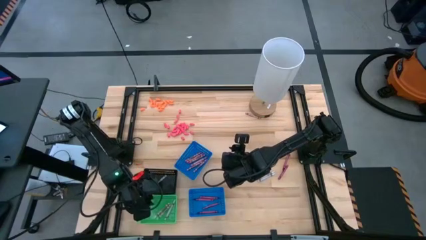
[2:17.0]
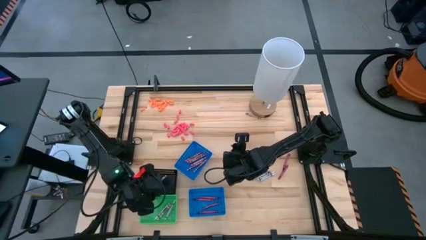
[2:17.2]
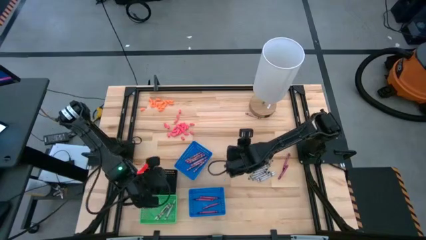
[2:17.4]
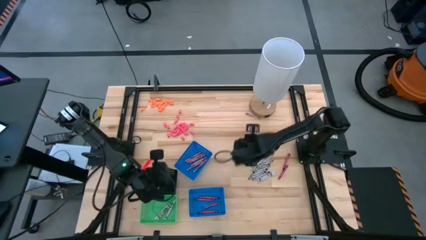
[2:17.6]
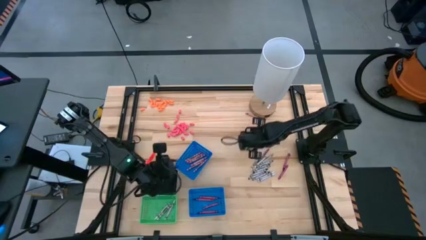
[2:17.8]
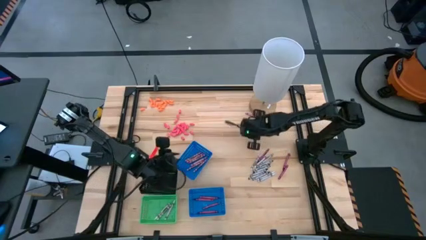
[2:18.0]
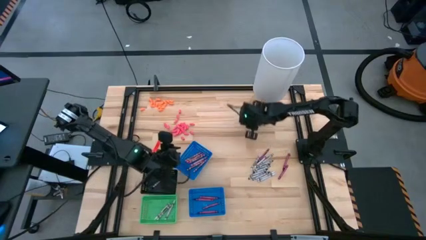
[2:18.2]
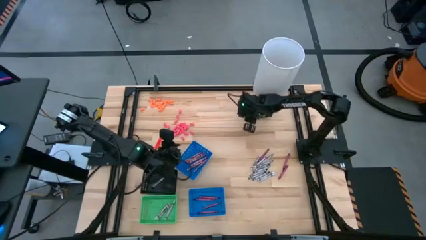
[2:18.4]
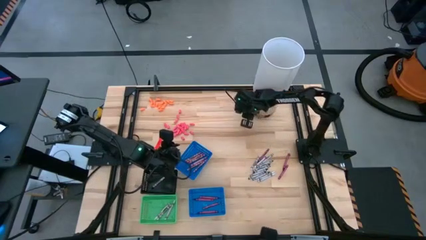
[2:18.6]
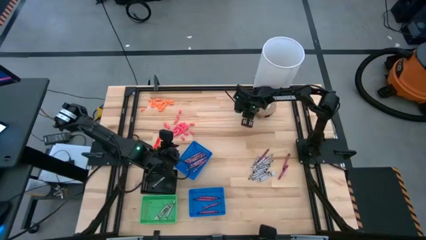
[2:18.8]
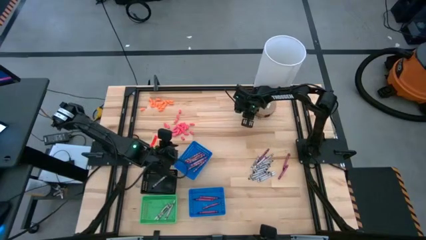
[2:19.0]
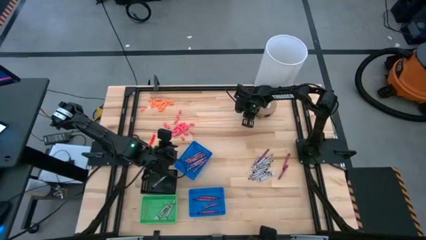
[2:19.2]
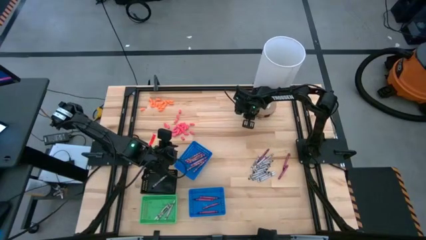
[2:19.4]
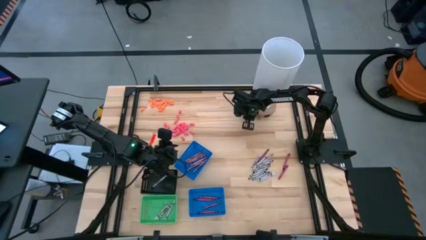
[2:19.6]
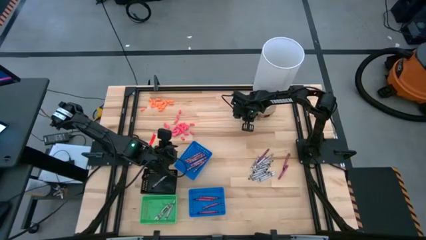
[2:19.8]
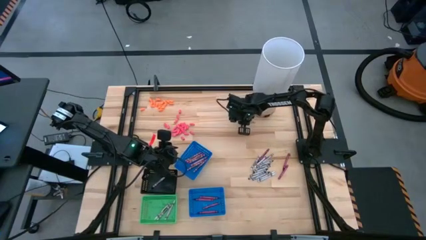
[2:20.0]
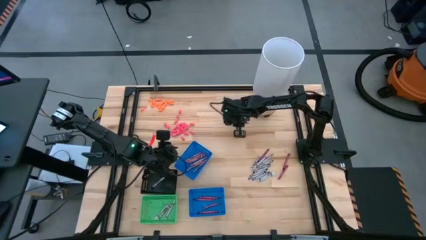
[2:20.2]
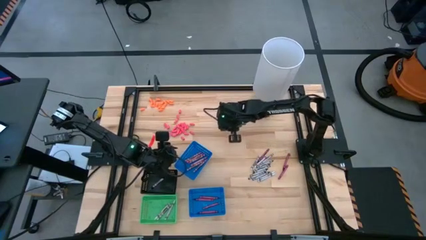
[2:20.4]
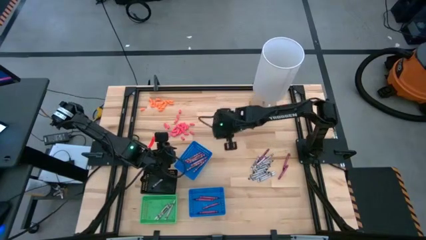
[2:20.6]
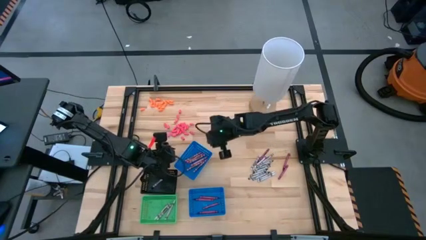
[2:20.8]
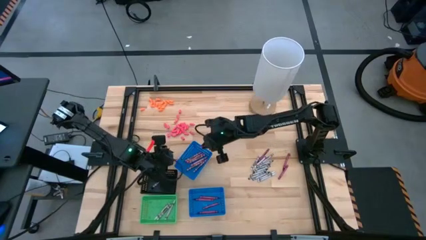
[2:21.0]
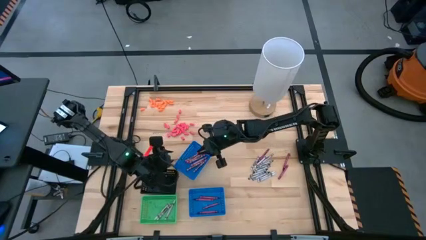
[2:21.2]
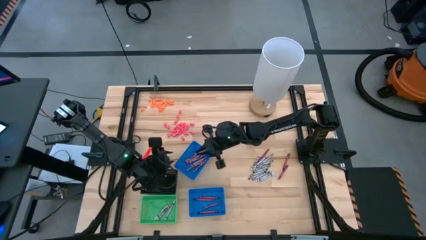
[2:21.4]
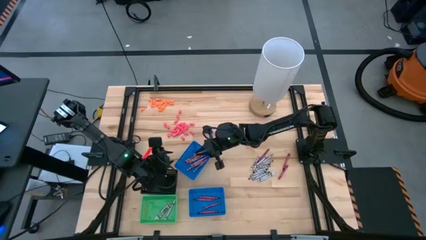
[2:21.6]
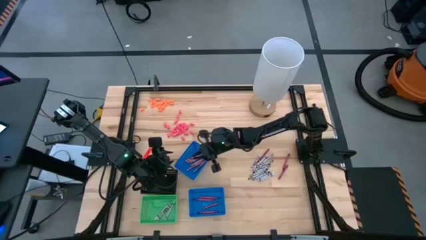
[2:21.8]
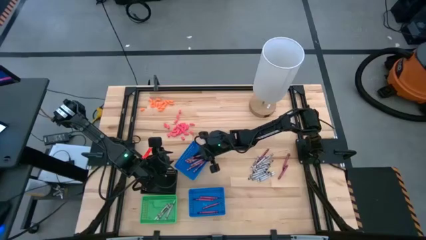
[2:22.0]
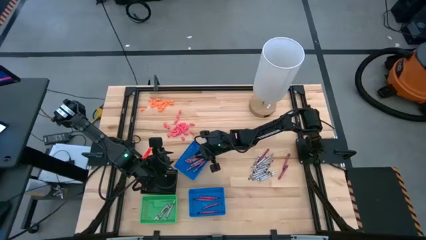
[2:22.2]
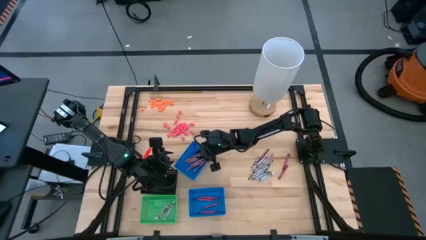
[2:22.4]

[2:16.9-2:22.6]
Task: Sort crayons
Put the pink crayon into the top blue bin

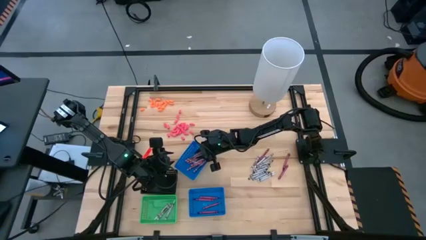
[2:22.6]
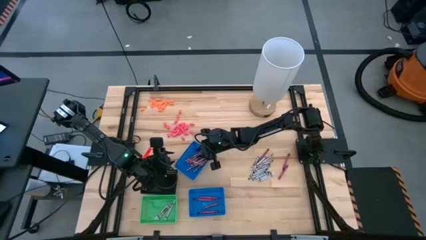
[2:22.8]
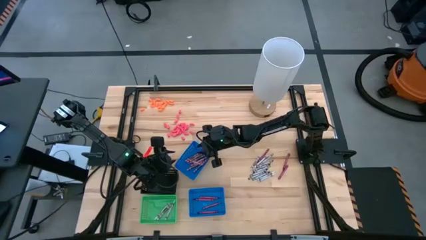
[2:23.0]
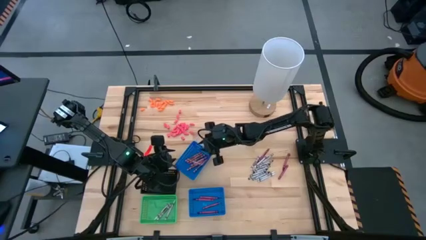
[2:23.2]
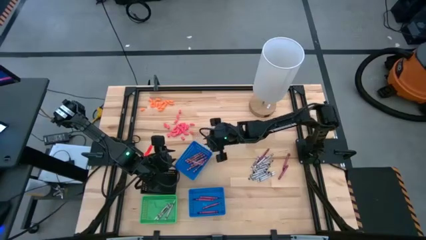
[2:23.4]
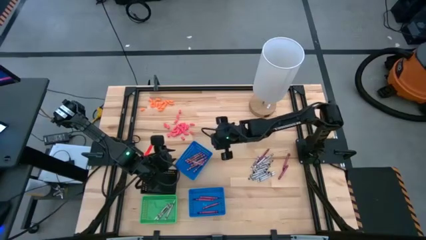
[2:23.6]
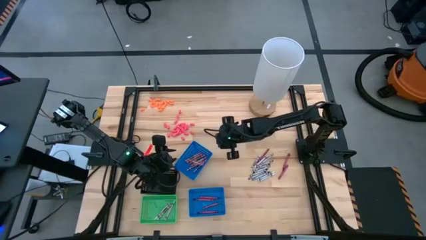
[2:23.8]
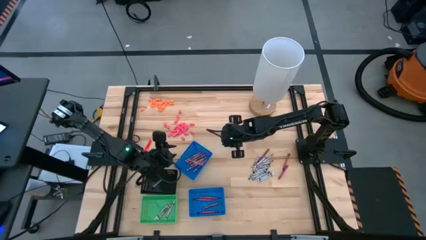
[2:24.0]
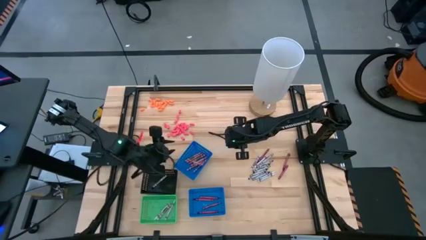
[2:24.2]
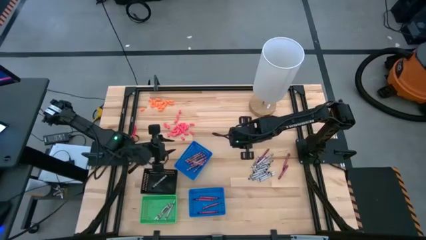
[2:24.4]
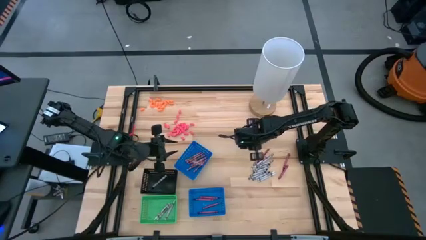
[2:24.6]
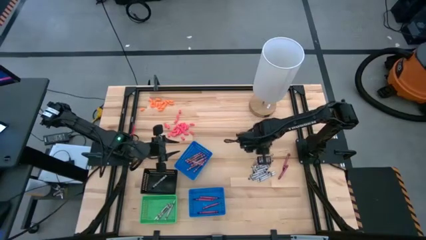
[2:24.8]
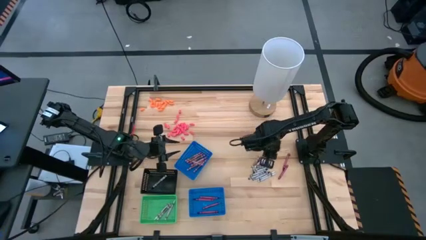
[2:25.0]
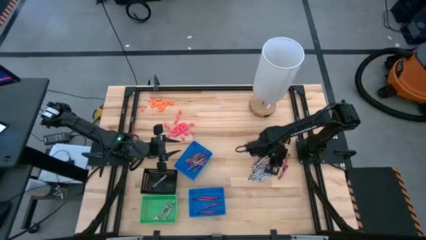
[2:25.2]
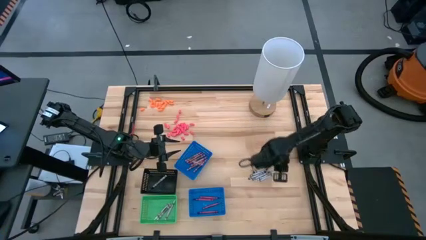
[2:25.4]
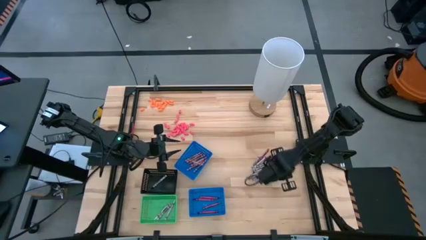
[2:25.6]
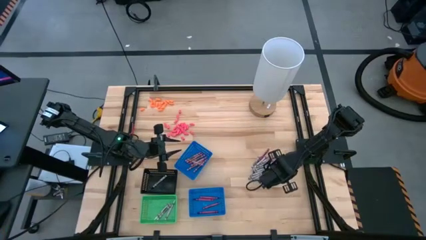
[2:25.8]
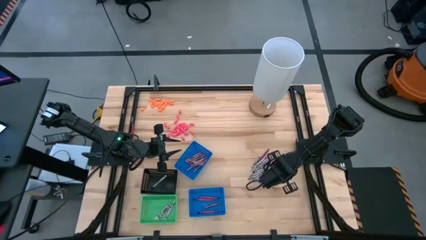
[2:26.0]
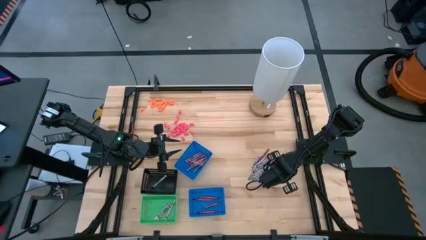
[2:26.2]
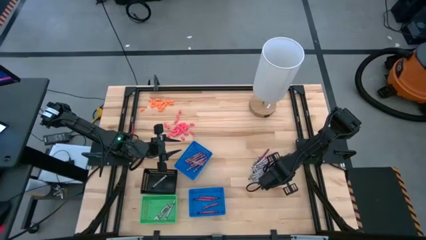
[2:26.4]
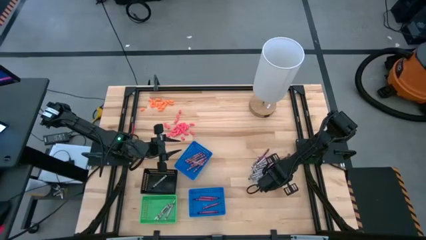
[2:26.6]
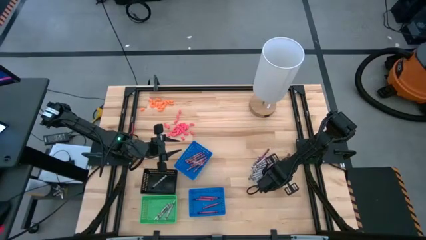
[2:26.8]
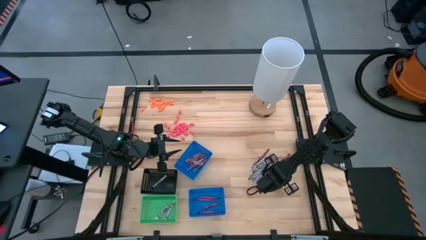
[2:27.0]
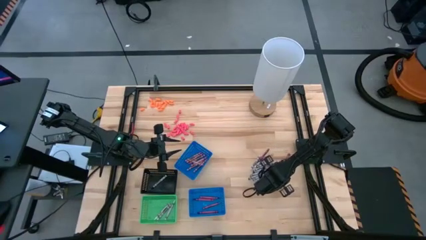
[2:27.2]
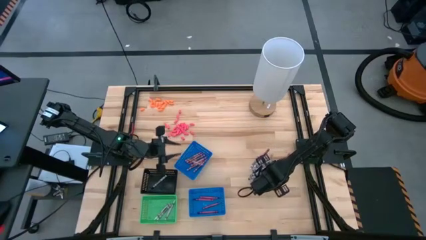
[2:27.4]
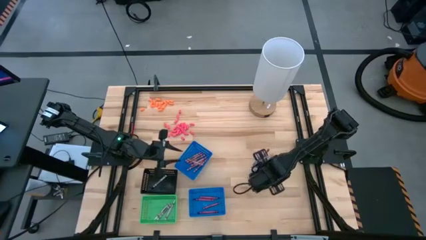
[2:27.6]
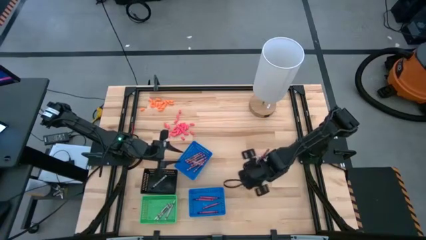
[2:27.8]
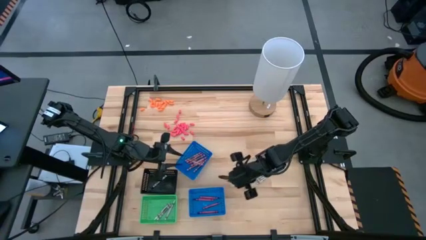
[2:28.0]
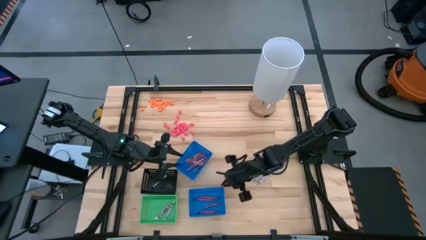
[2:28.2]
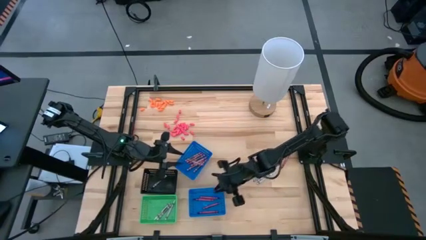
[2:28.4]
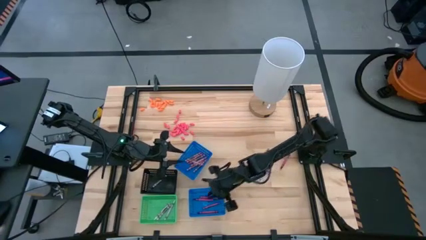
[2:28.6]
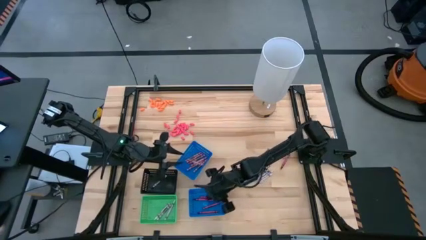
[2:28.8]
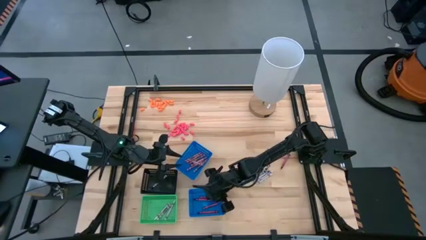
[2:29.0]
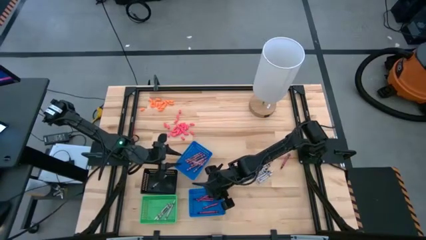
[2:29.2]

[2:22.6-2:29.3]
Put the violet crayon into the bottom blue bin
